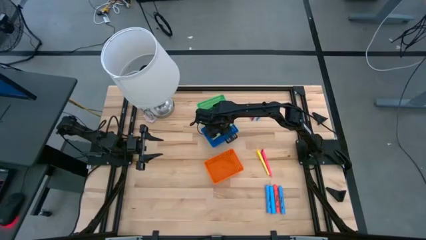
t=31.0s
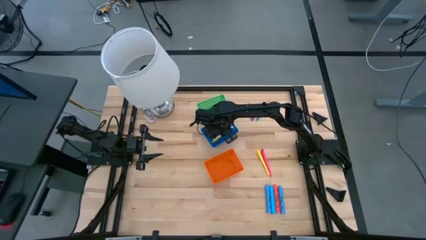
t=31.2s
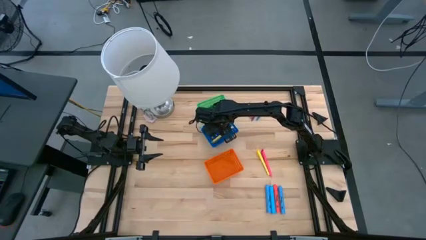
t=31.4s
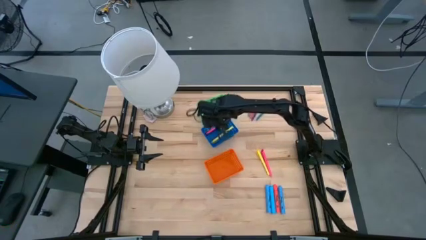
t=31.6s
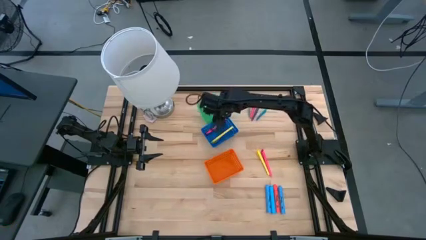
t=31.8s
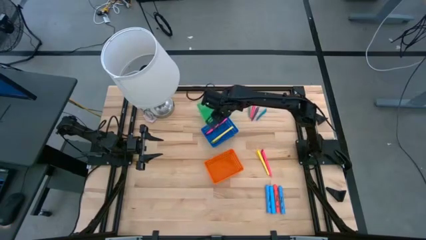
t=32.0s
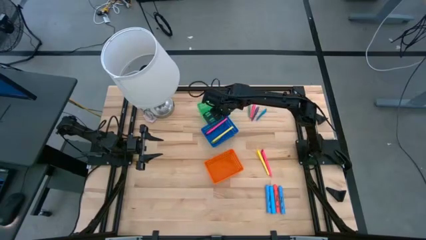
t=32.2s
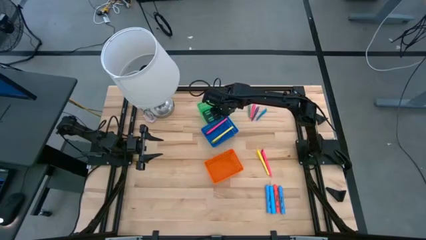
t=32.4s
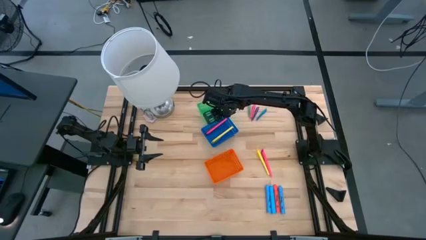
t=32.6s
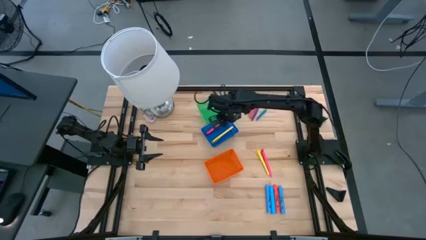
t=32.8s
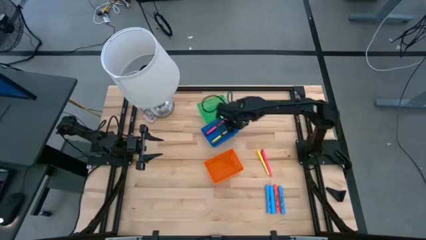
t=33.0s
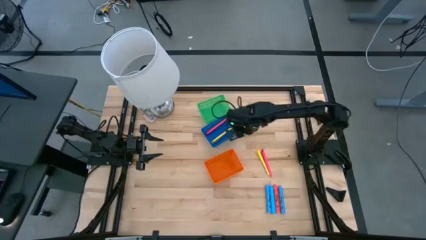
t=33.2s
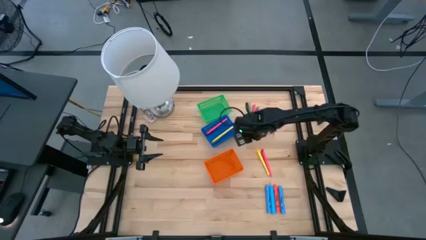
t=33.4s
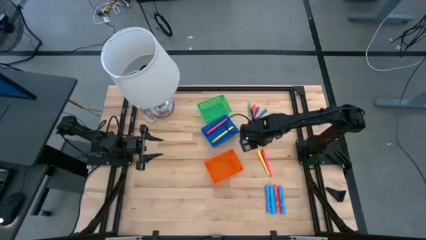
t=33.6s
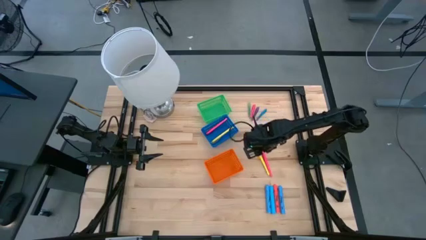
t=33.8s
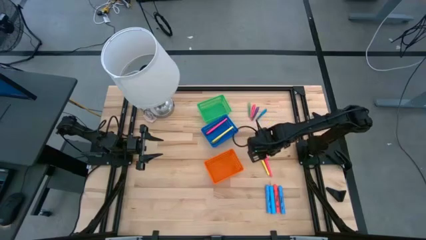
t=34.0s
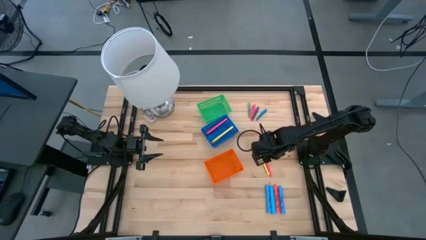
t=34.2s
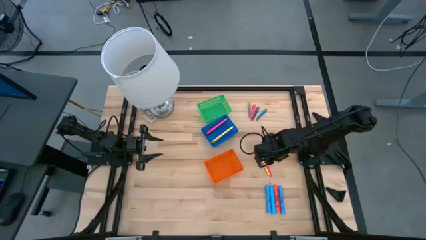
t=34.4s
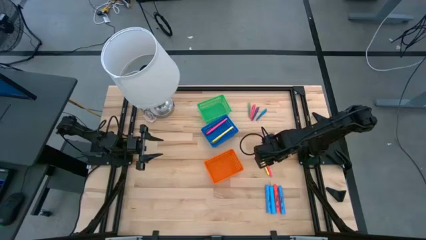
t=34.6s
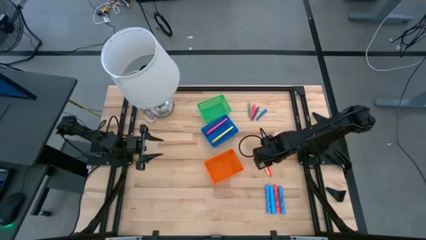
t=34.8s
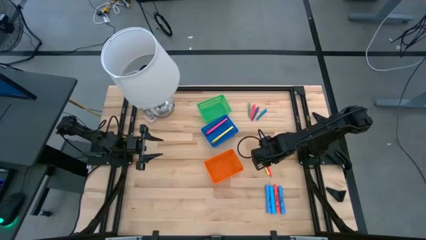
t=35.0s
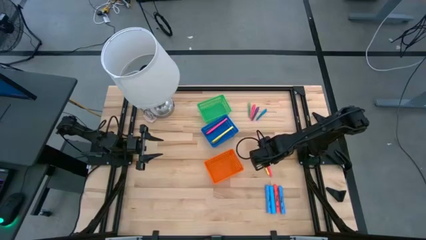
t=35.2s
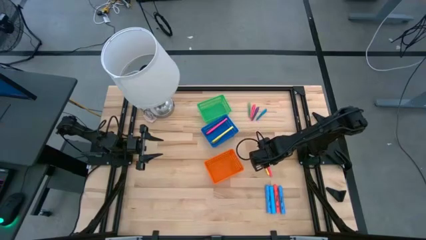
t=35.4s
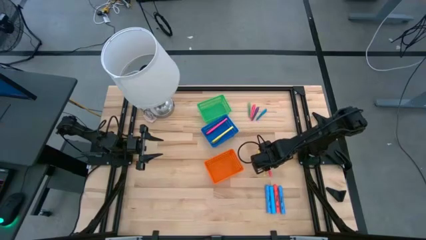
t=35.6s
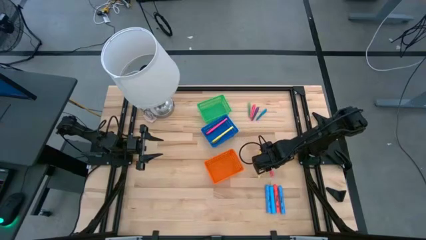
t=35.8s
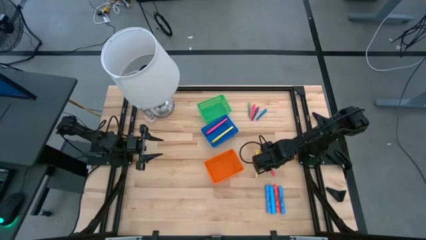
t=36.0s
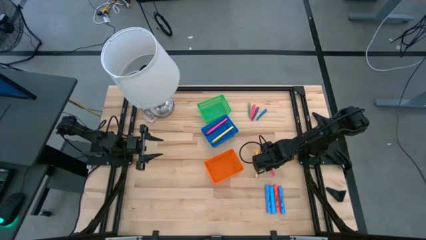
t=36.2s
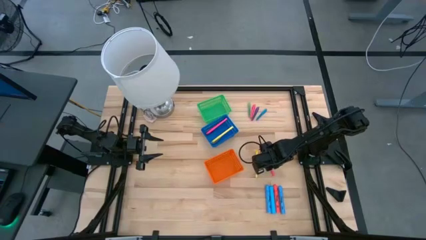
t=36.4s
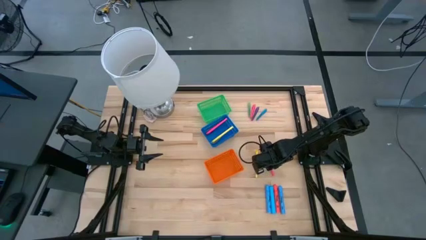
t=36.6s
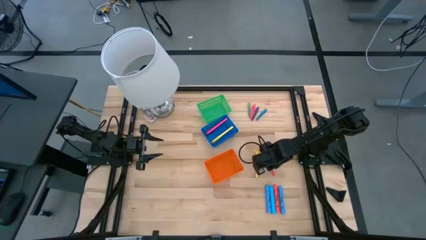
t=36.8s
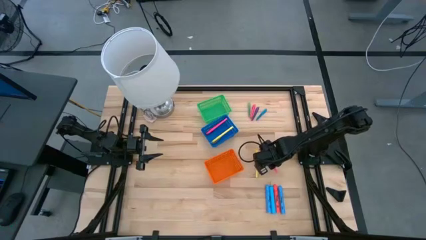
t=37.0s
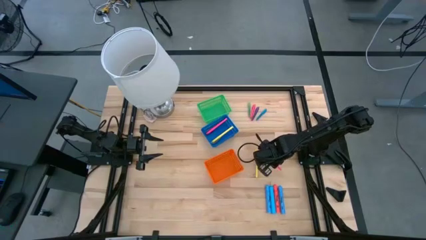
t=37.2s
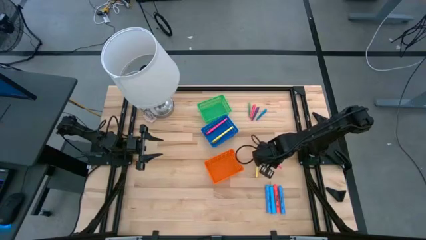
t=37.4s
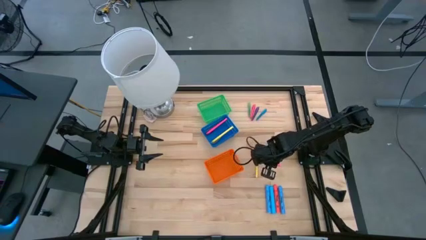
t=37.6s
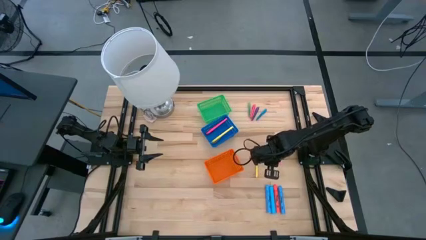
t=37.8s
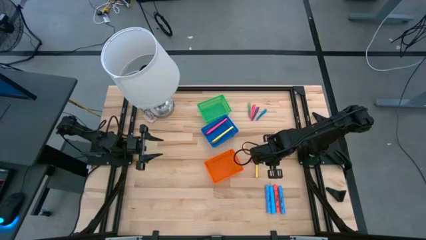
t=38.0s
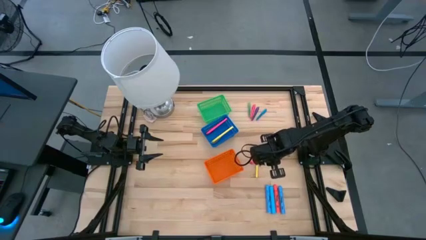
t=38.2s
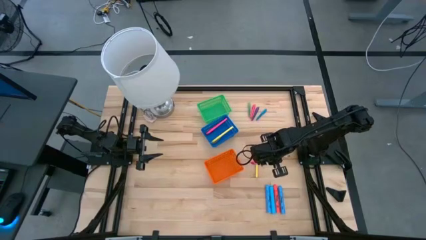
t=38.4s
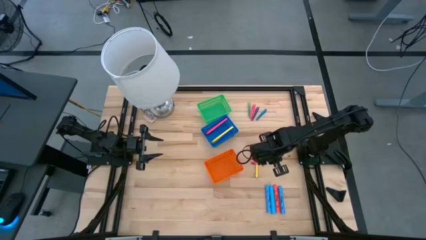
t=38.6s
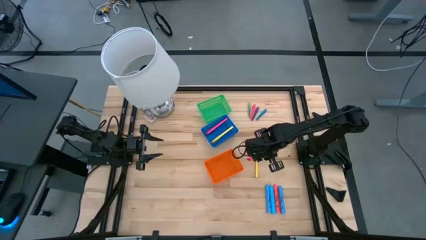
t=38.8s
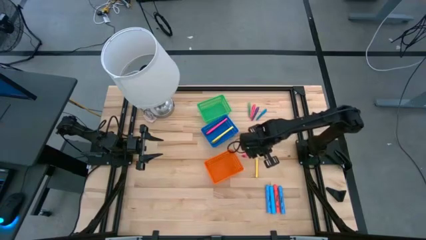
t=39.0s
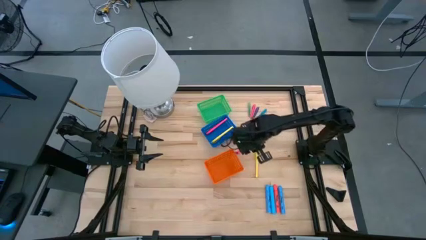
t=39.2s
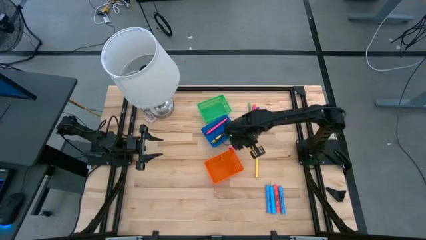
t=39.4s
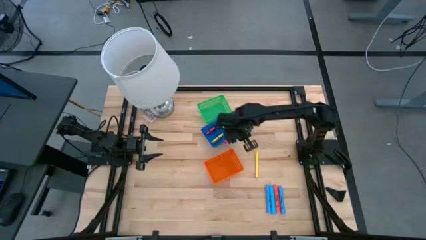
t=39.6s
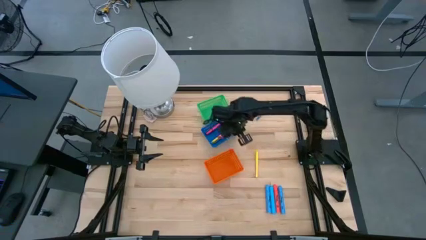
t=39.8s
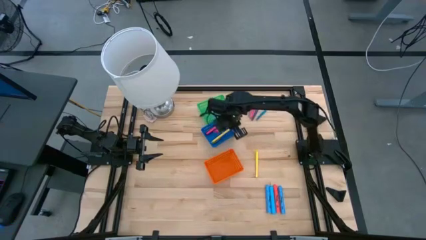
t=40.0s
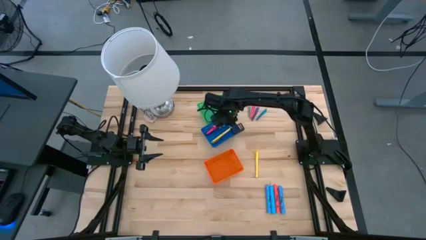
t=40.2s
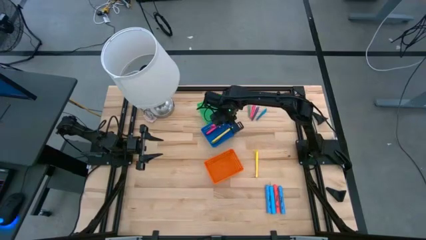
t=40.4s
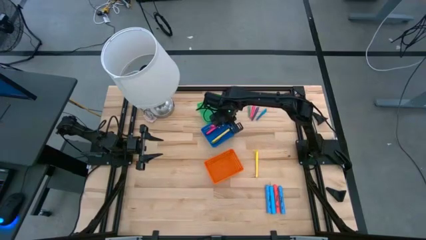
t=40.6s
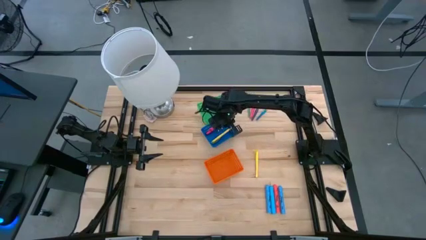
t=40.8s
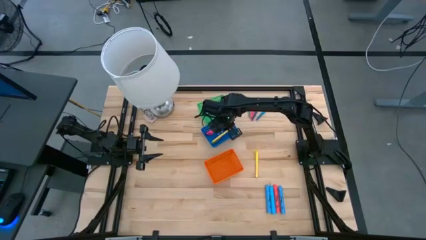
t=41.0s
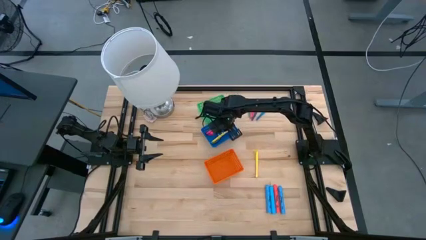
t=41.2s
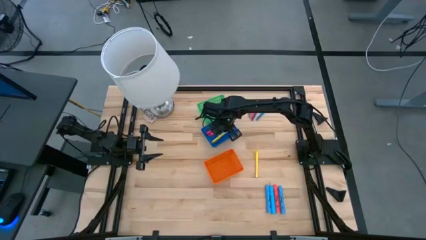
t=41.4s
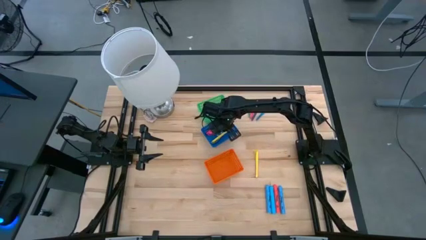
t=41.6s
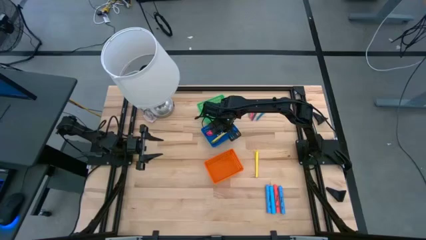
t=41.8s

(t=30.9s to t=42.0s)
Task: Pick & Place Markers
Put the pink pen into the blue bin

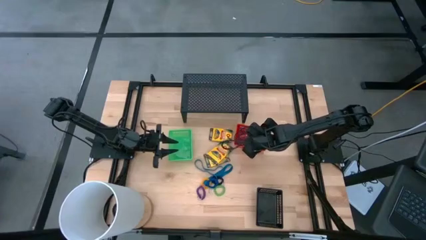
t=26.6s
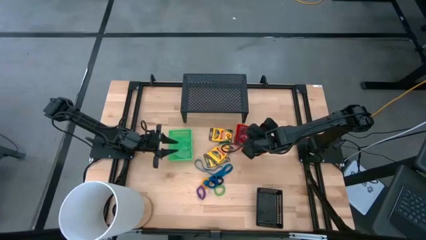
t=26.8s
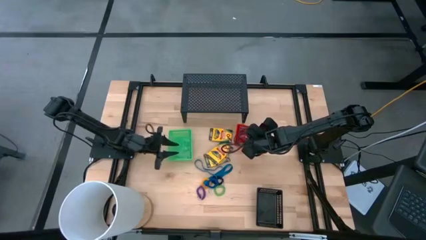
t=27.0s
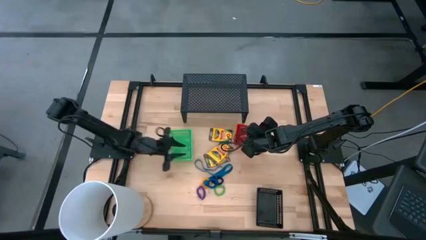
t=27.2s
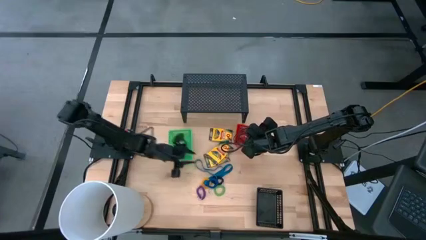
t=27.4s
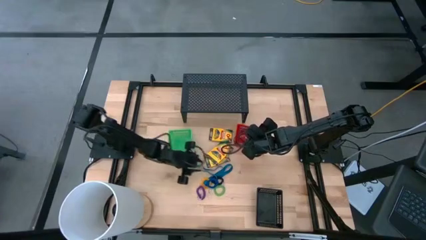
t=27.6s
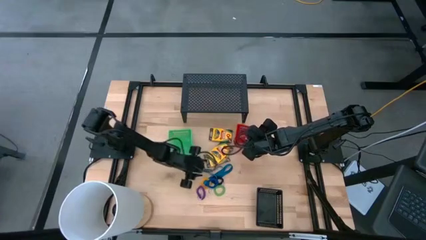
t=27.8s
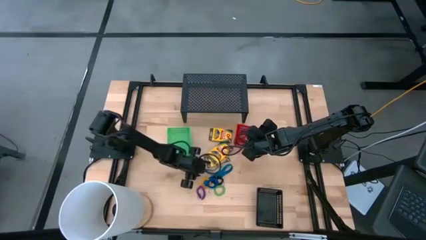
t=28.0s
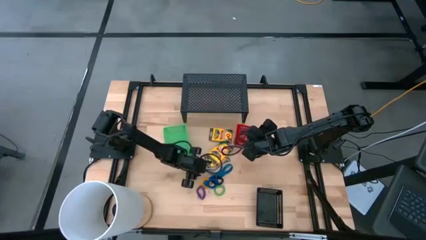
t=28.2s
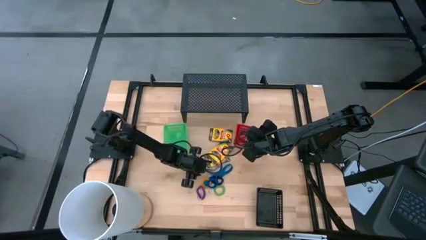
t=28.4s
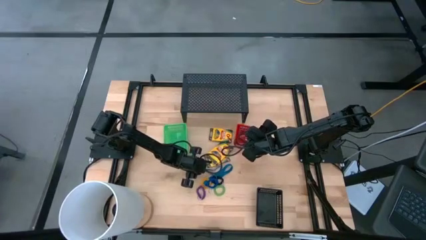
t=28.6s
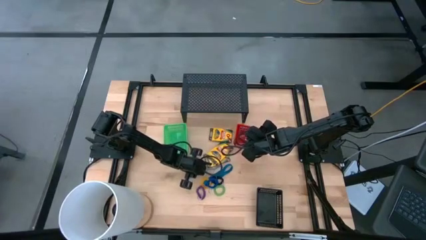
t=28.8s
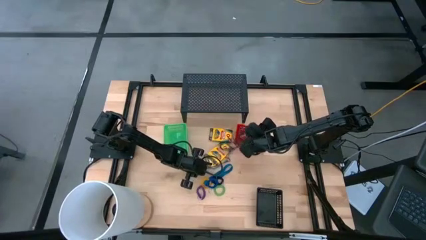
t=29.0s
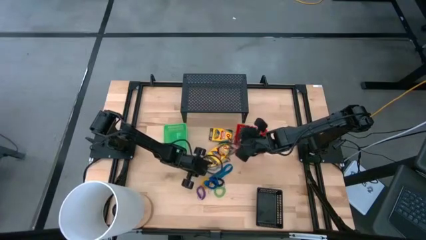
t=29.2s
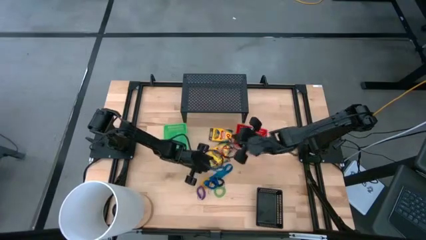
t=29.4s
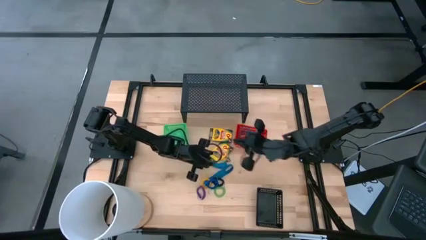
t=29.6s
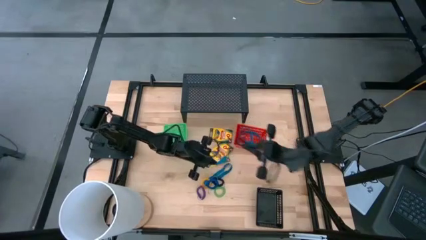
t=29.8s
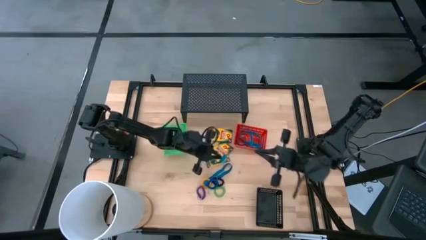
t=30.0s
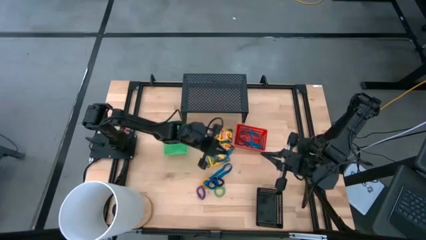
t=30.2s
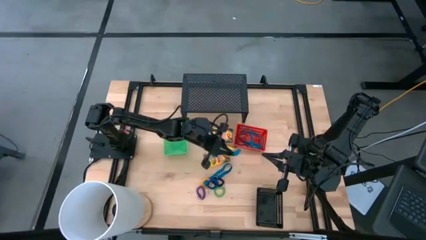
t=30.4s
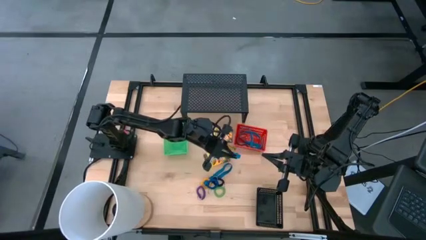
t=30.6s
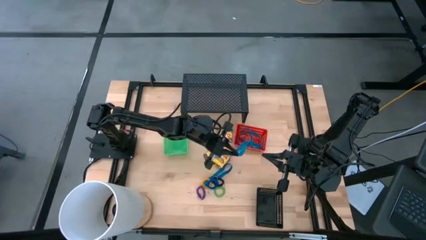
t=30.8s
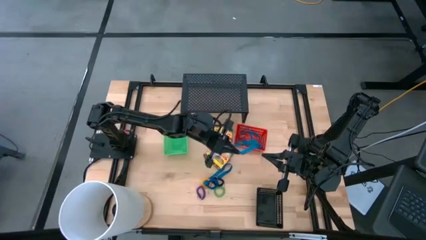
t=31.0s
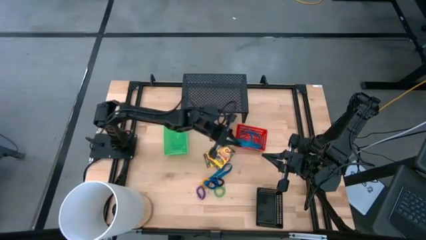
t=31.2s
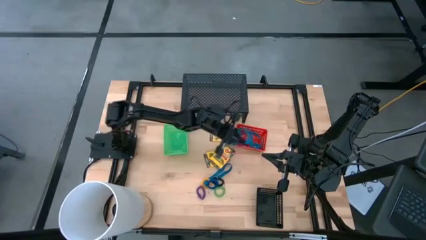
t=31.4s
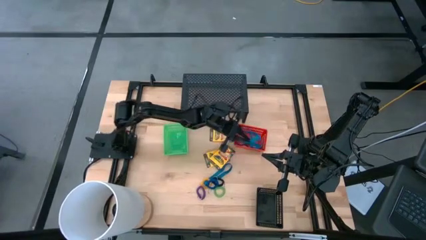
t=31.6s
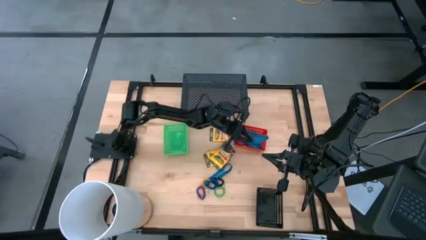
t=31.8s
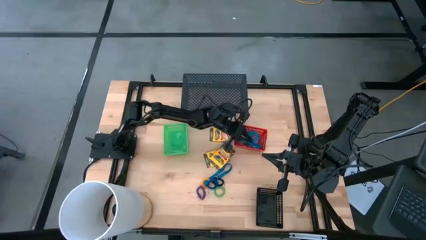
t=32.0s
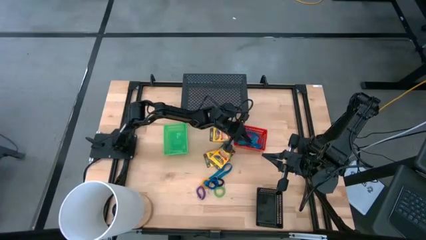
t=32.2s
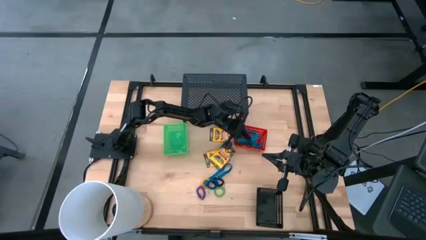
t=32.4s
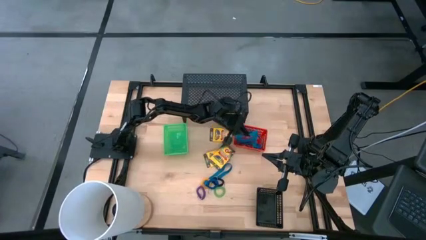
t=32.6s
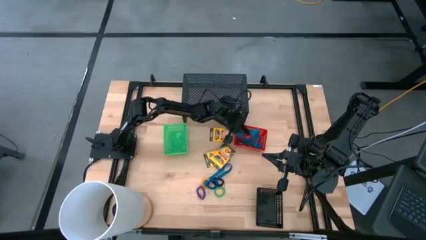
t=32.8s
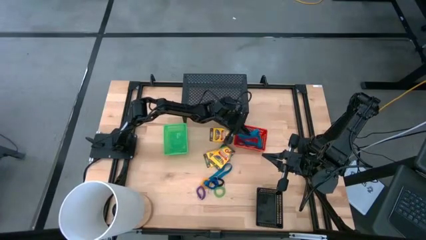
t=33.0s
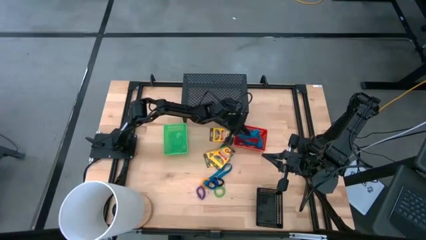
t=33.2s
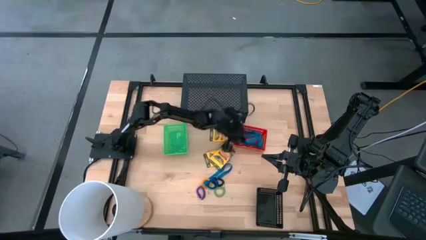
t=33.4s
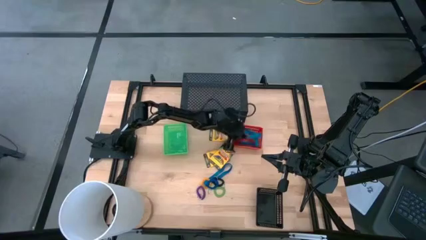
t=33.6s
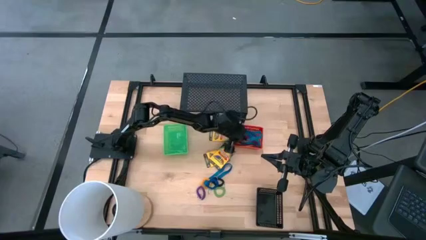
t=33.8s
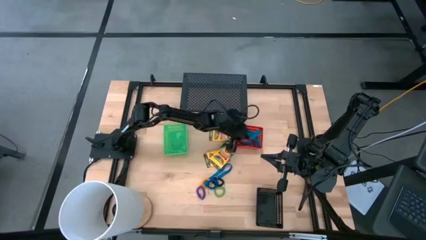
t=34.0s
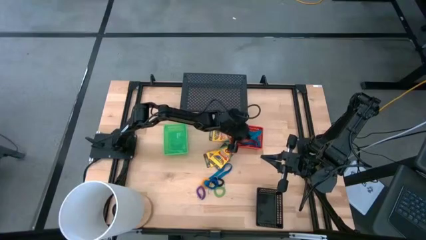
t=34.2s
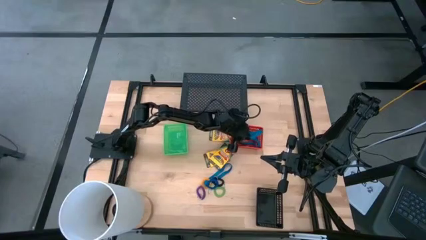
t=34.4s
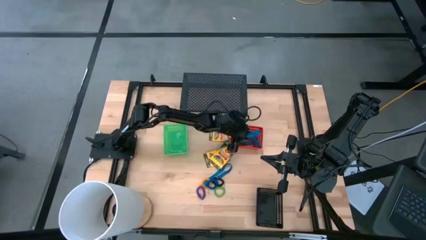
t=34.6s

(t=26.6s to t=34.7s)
Task: Pick & Place Office Desk Supplies
Put the blue rubber band into the red bin
